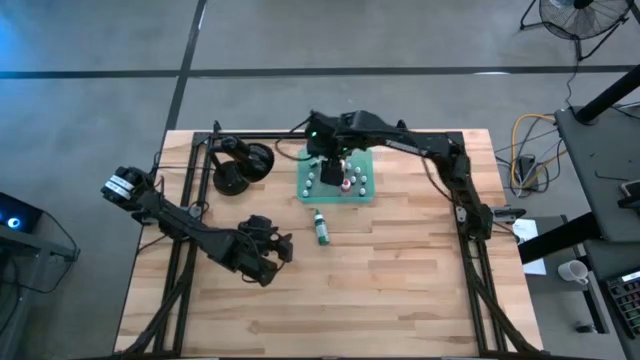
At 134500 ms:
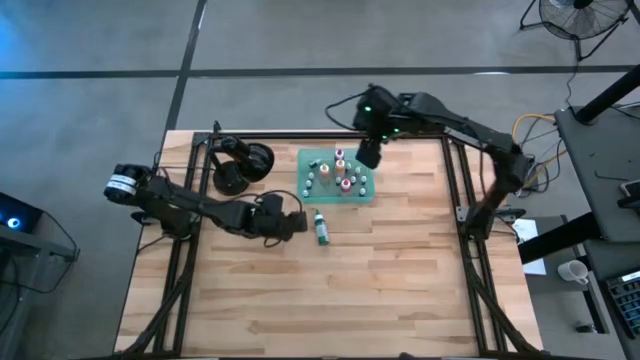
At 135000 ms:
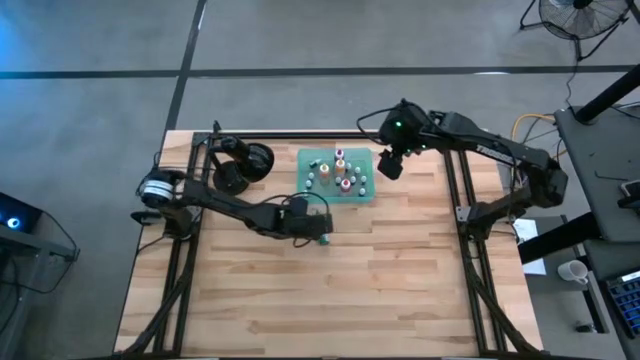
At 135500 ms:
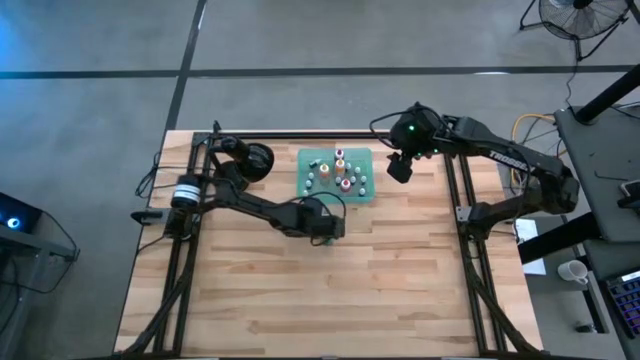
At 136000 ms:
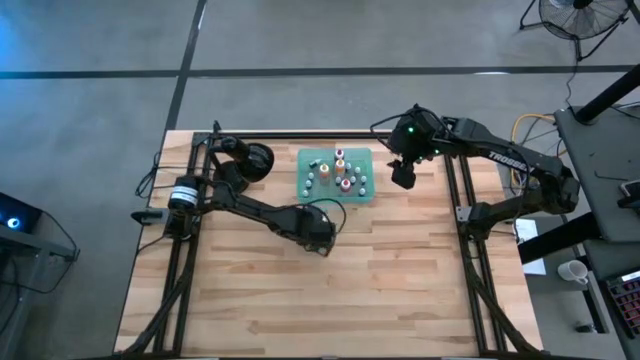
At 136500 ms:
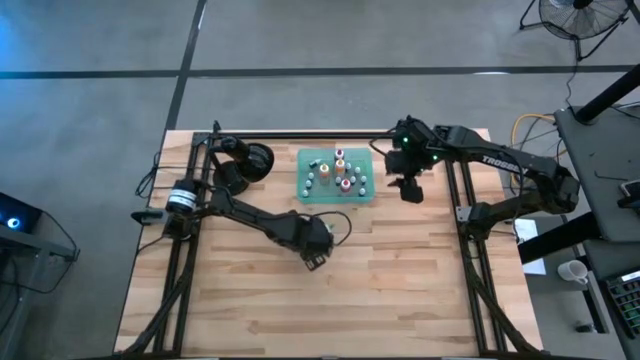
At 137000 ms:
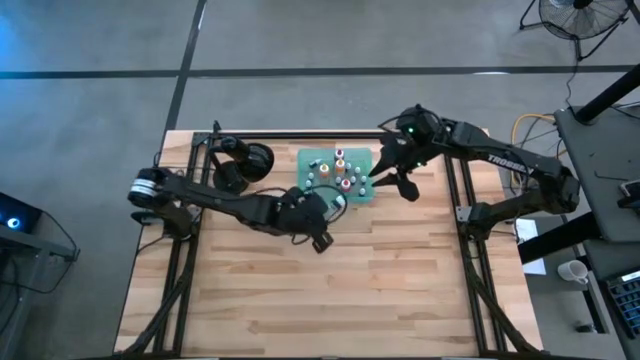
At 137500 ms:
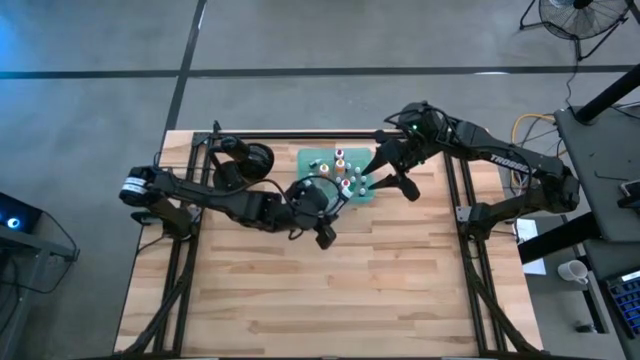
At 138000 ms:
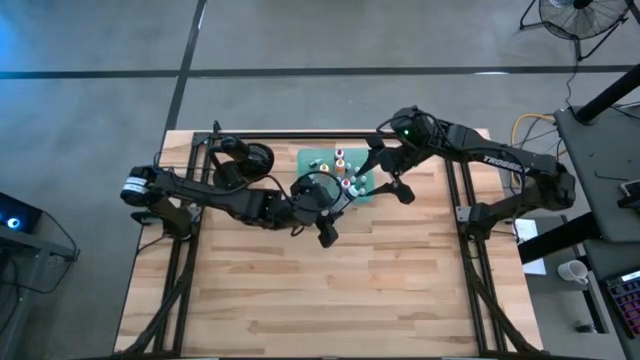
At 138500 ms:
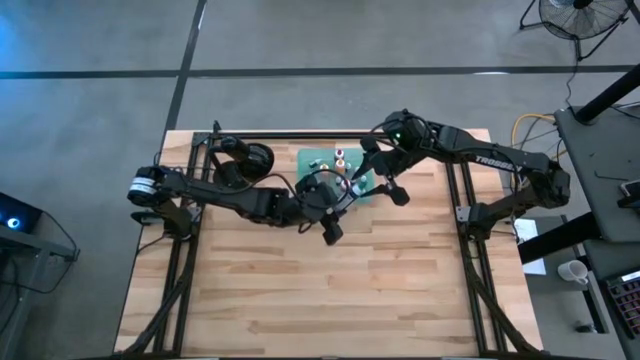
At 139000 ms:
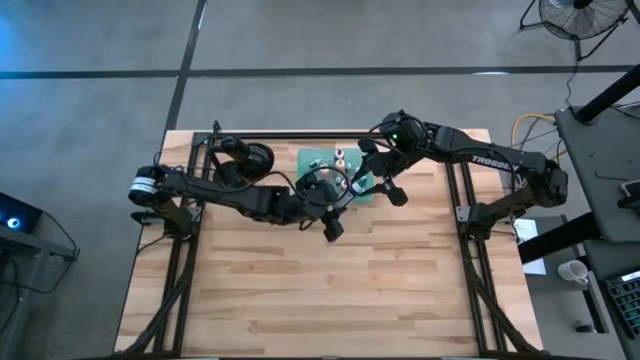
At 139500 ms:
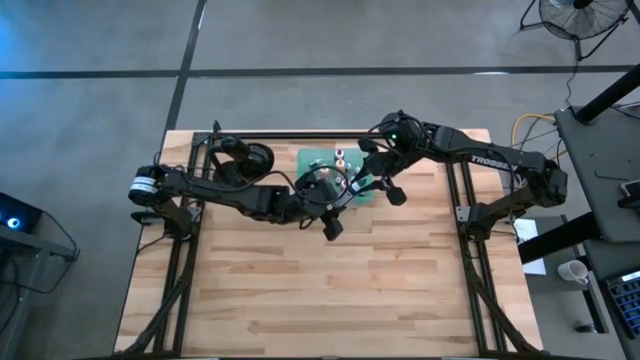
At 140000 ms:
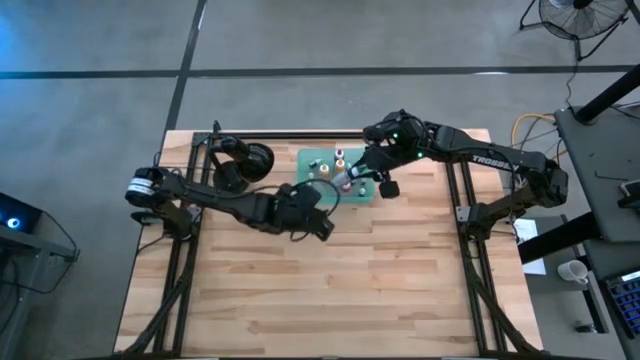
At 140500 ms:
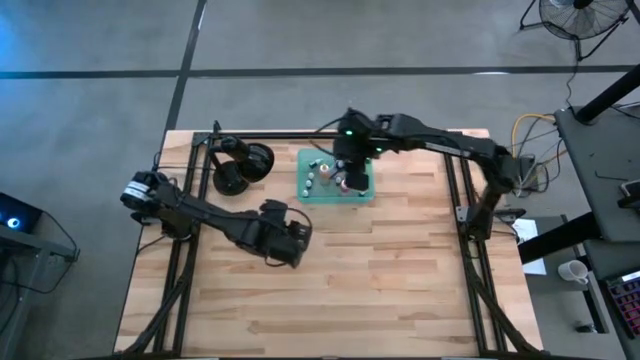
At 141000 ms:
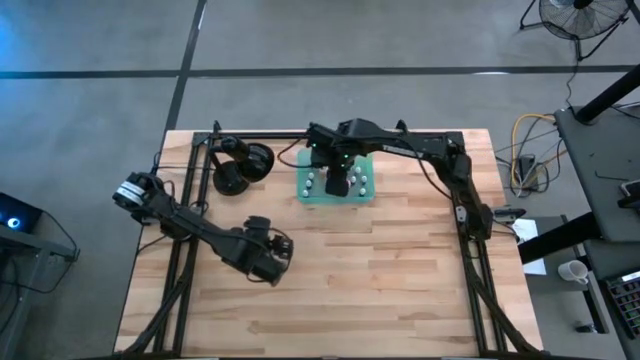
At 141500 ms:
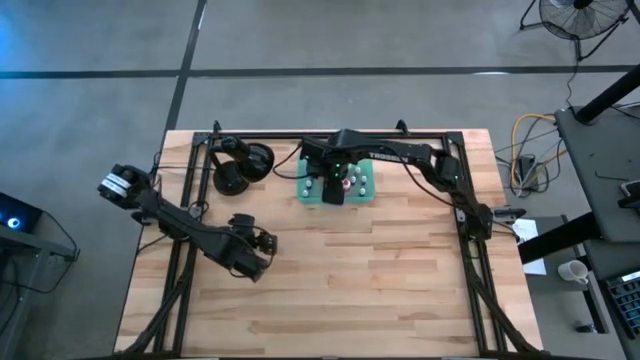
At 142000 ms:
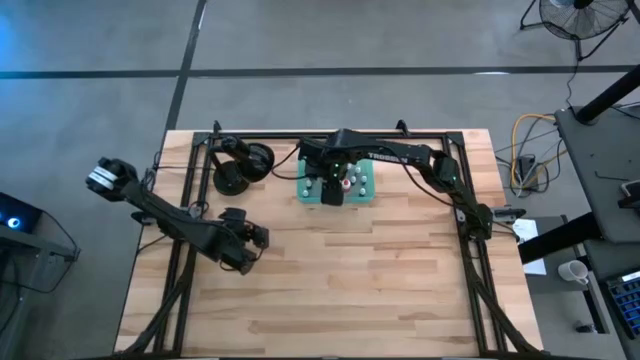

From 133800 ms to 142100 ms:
Task: Pick & Place food coloring
Put the big green food coloring bottle into the bin

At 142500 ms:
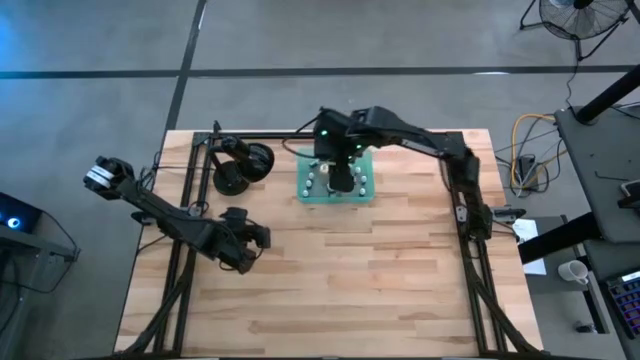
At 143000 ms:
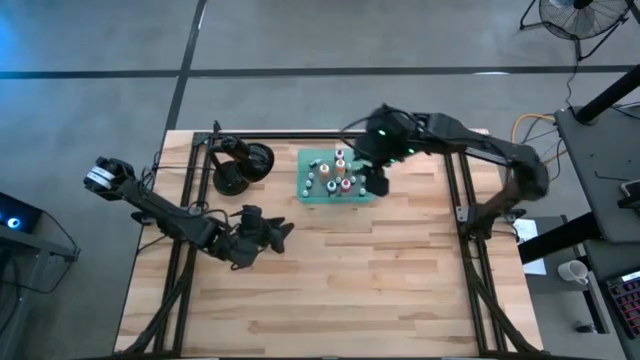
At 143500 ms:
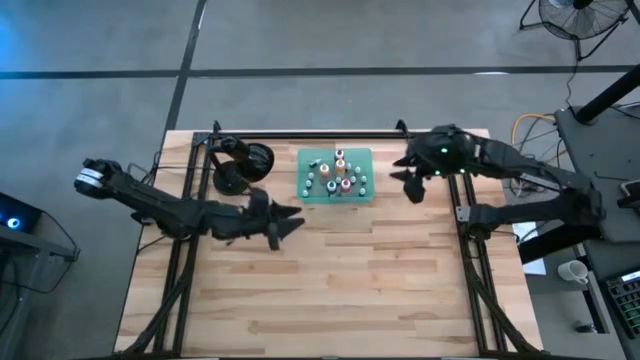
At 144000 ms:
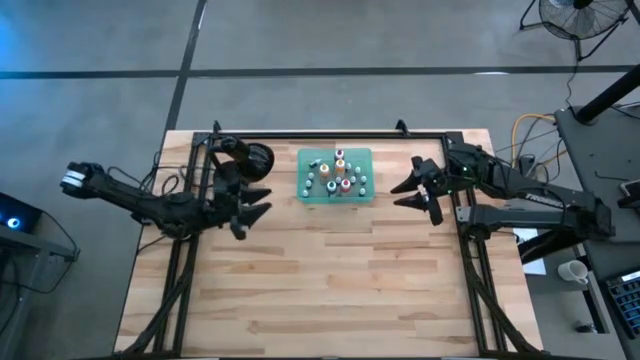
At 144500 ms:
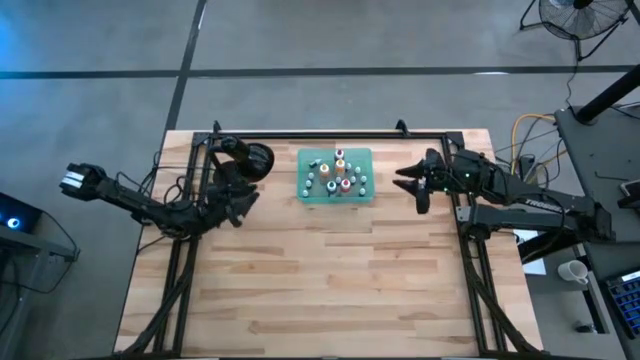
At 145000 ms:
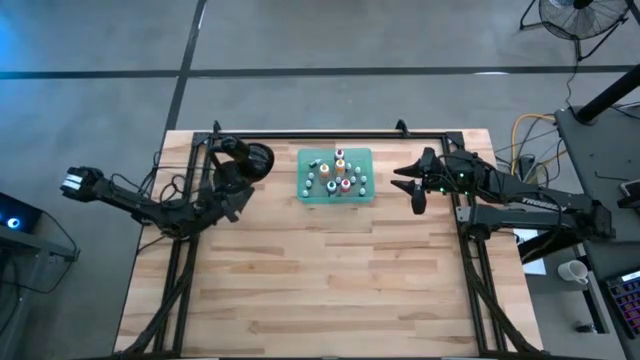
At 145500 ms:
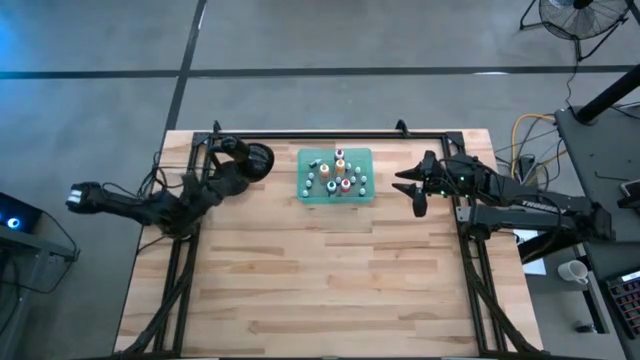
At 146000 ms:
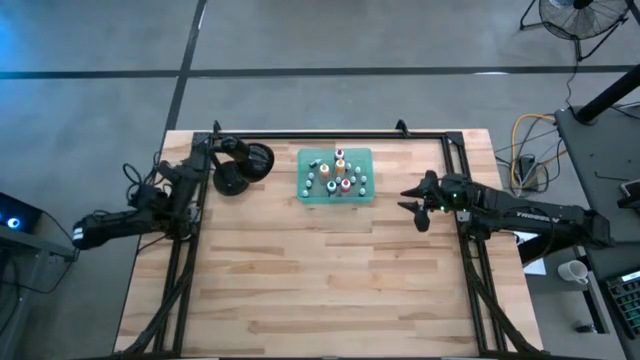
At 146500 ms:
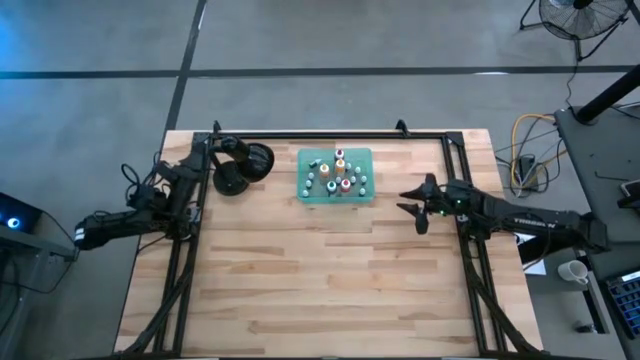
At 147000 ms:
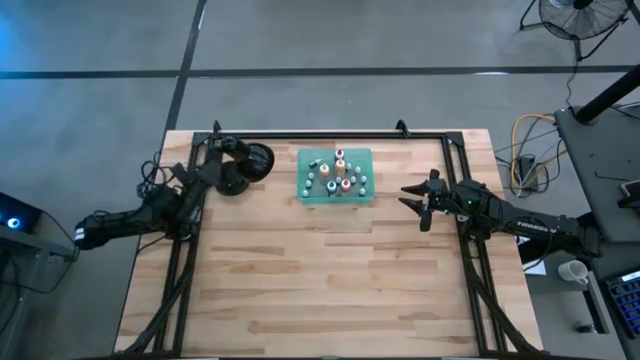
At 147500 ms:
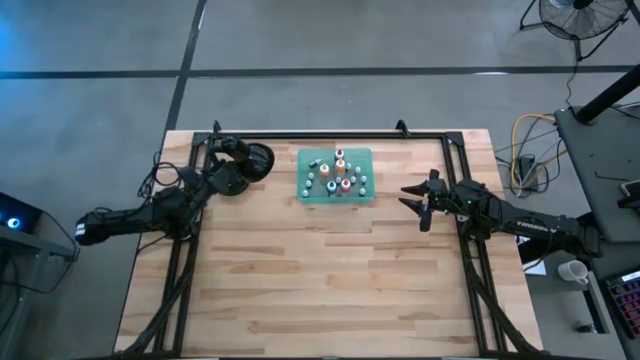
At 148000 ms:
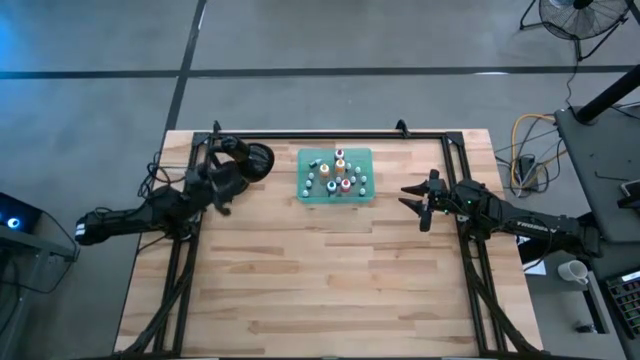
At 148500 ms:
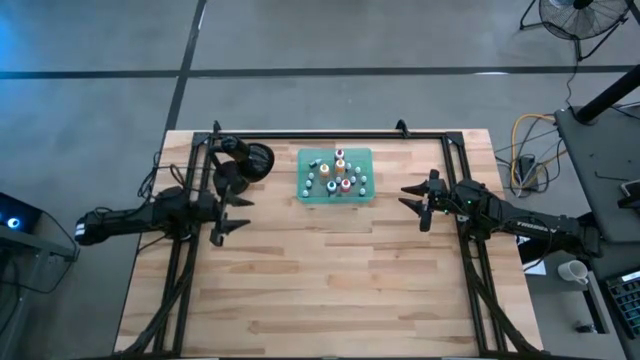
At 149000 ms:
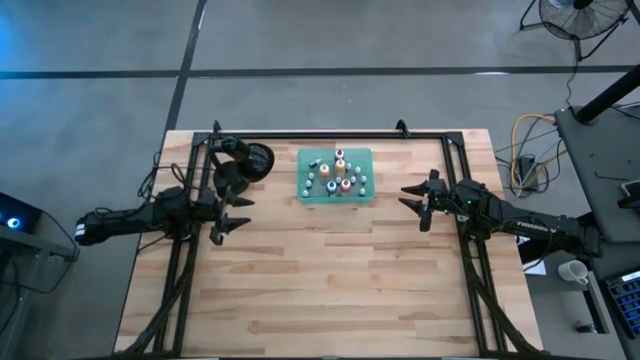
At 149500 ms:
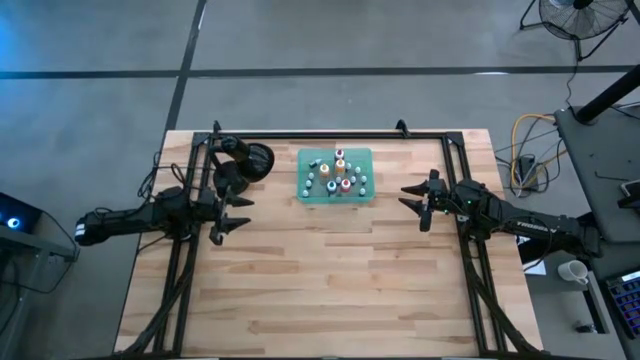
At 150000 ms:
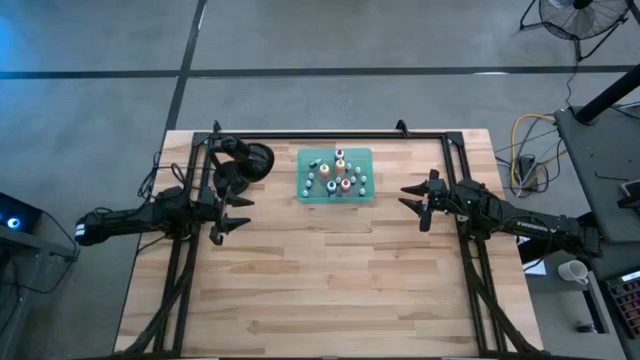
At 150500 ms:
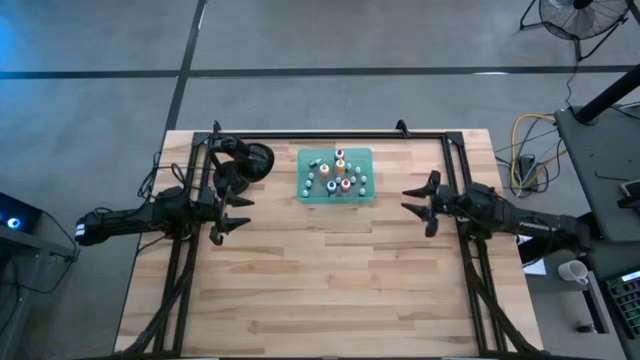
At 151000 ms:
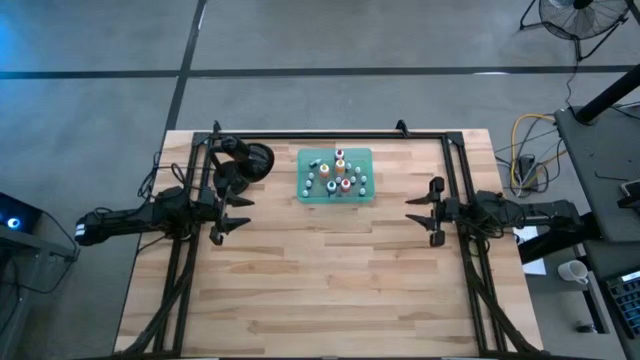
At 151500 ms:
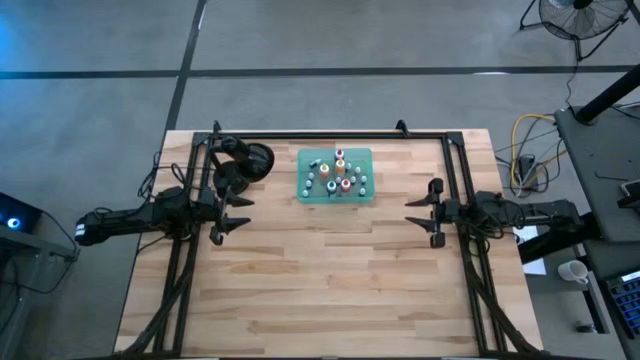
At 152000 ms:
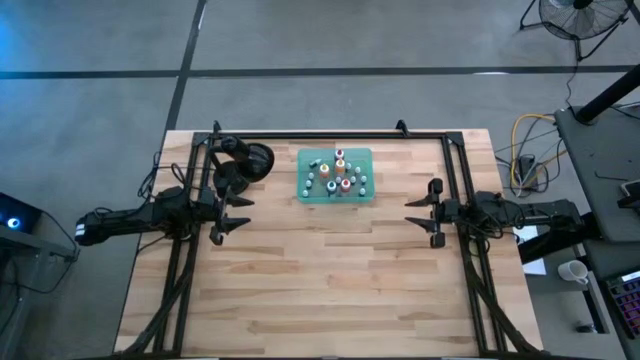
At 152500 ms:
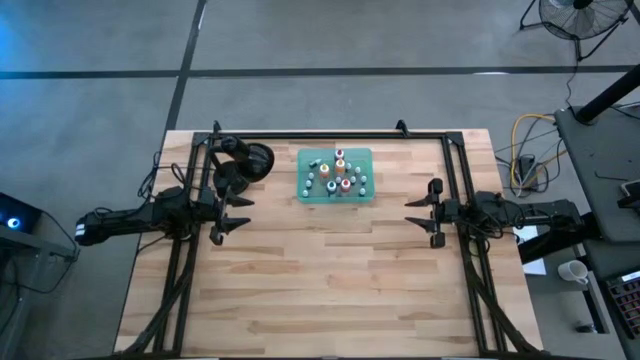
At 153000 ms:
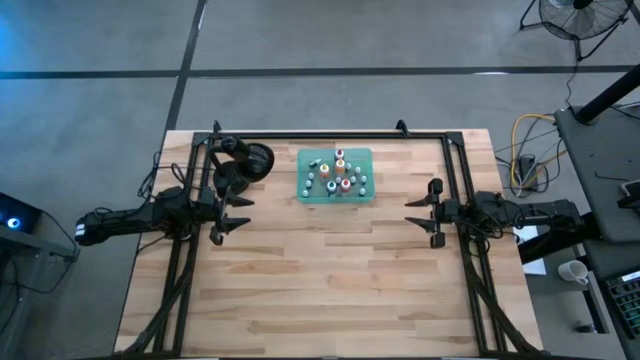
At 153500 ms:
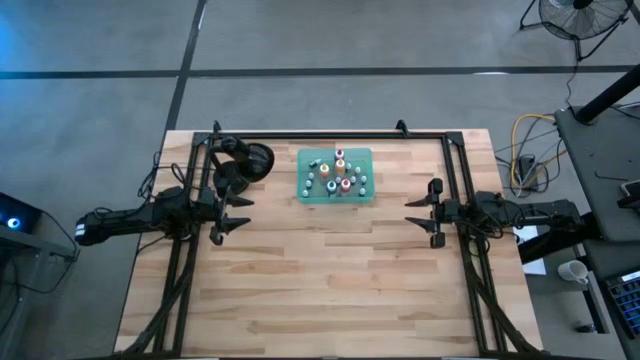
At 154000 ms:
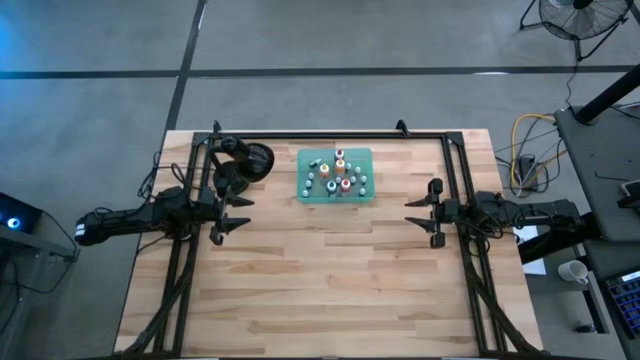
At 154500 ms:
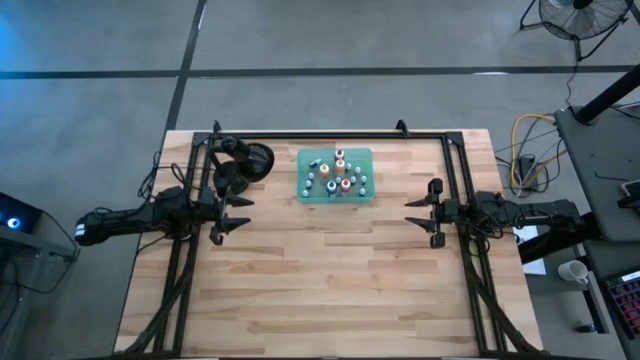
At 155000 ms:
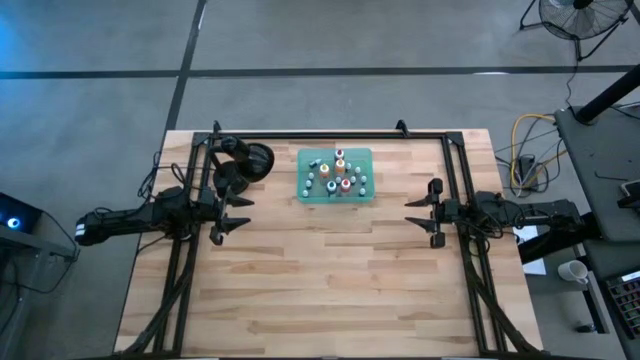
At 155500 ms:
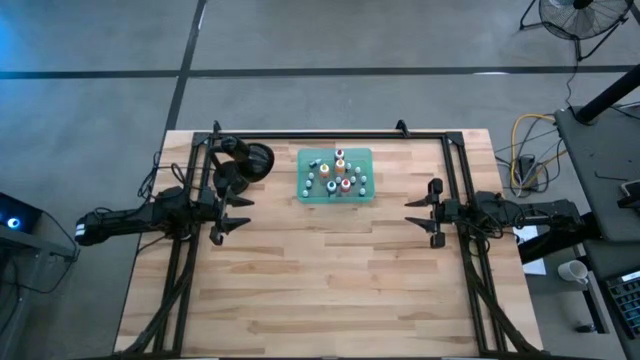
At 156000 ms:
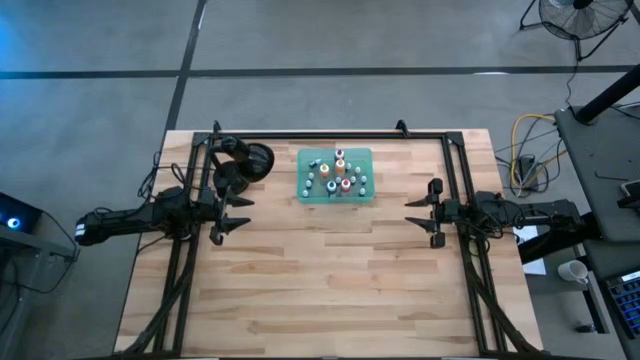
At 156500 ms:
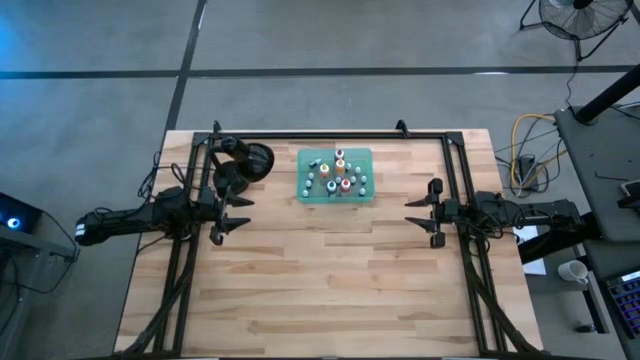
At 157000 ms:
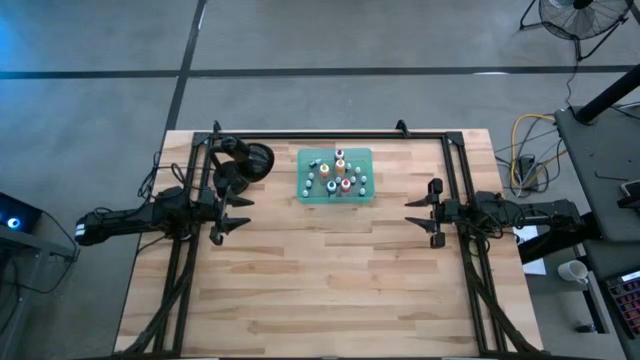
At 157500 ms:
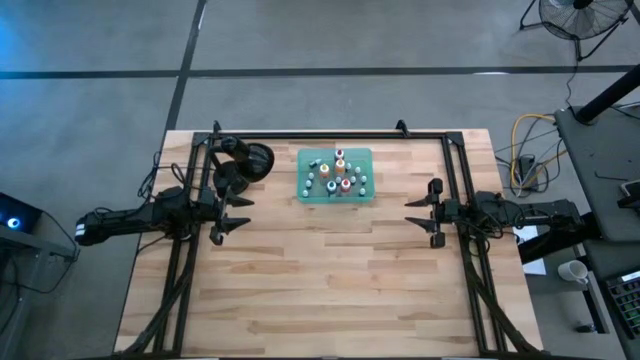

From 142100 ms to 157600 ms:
Return to Home Position
